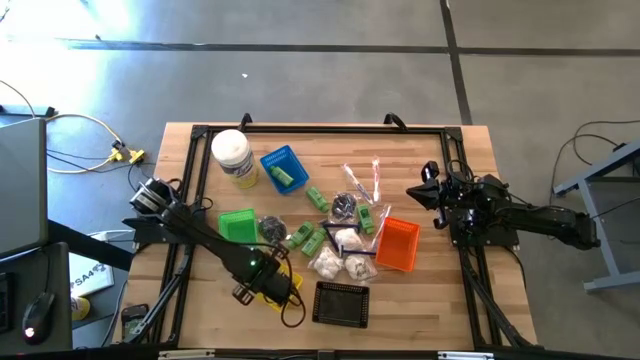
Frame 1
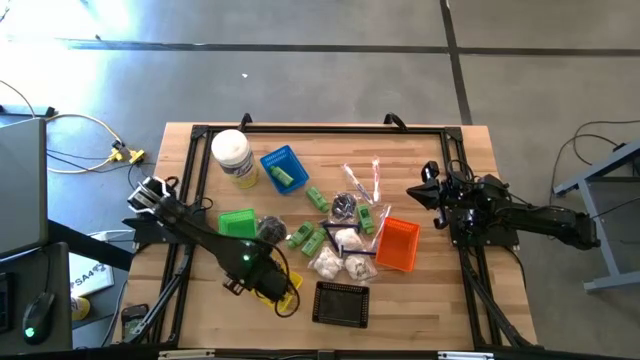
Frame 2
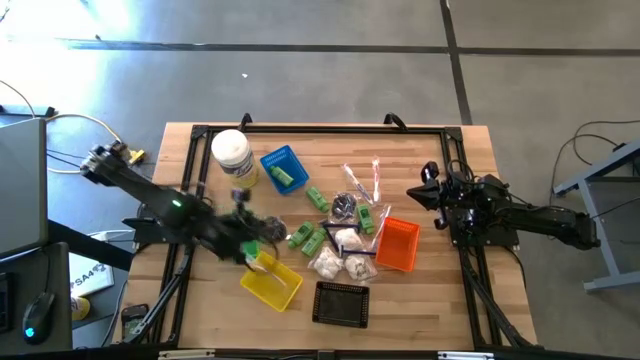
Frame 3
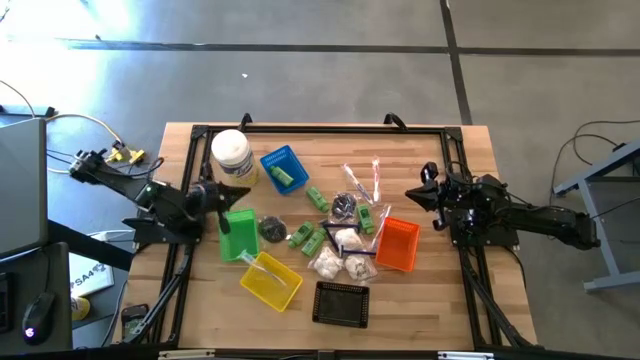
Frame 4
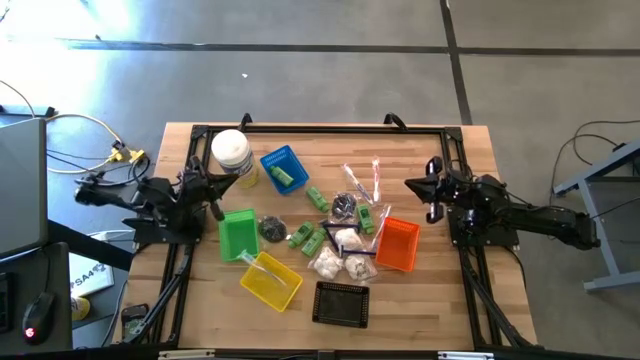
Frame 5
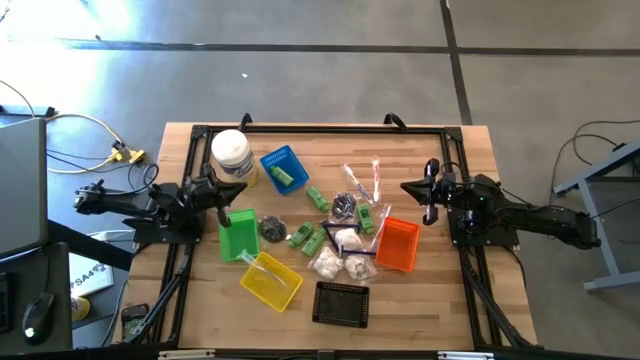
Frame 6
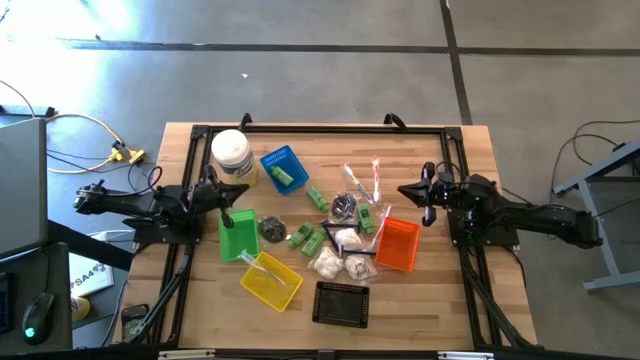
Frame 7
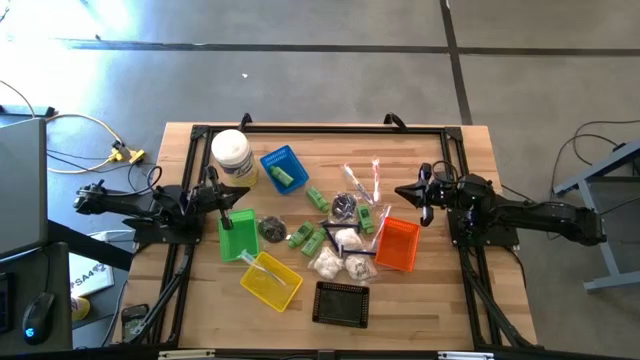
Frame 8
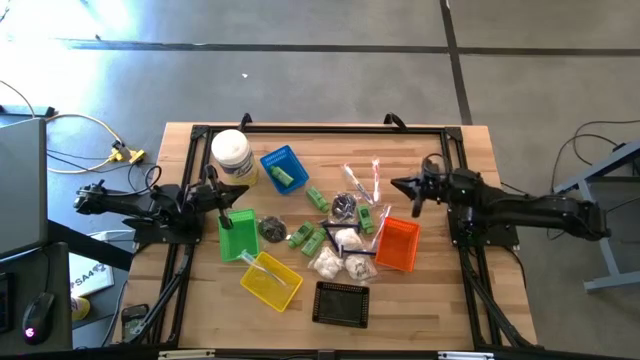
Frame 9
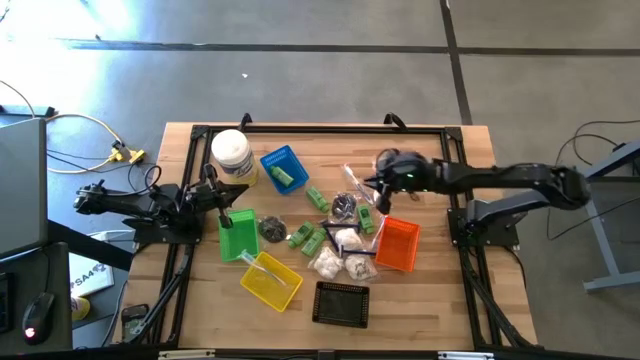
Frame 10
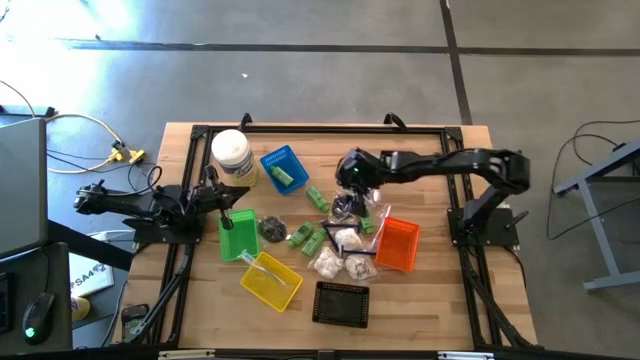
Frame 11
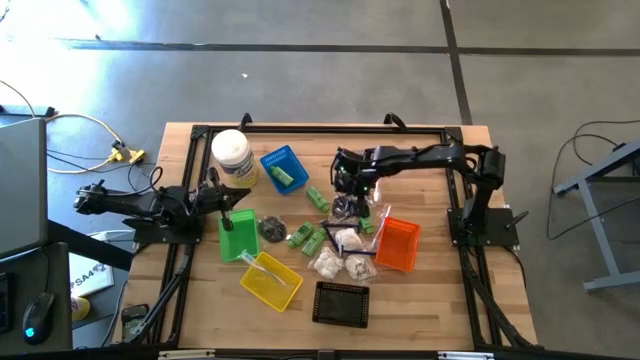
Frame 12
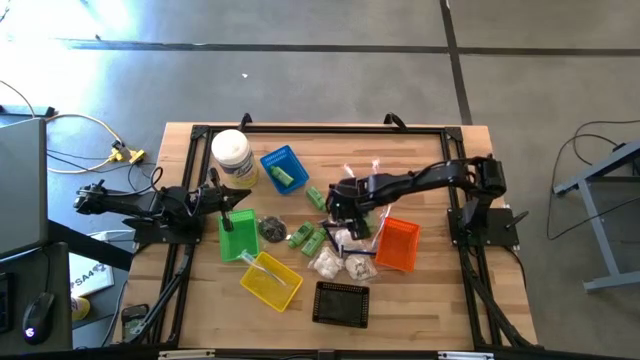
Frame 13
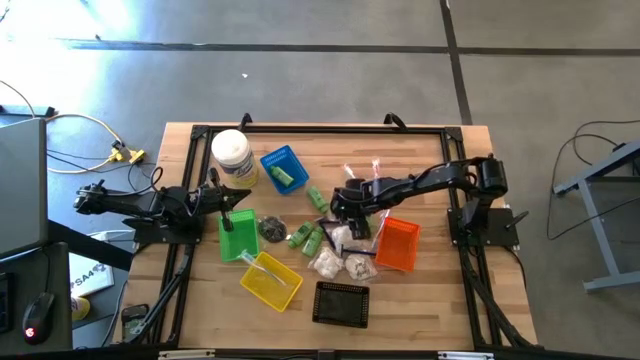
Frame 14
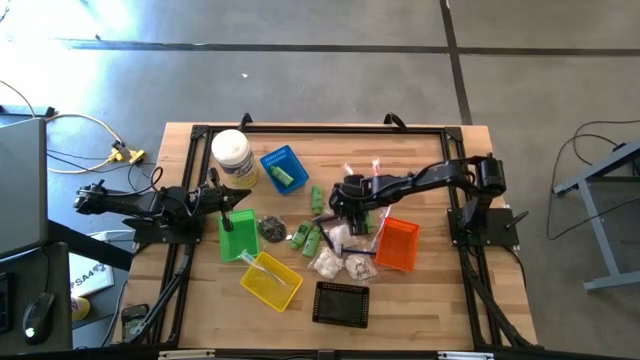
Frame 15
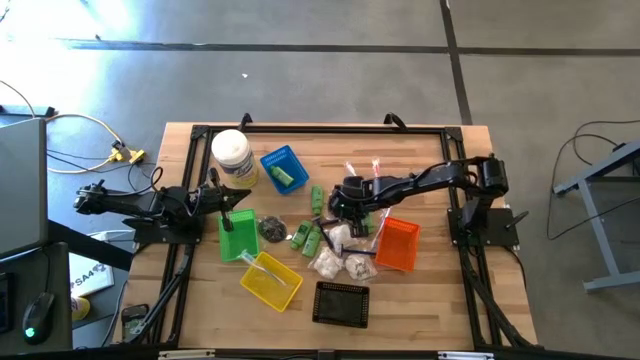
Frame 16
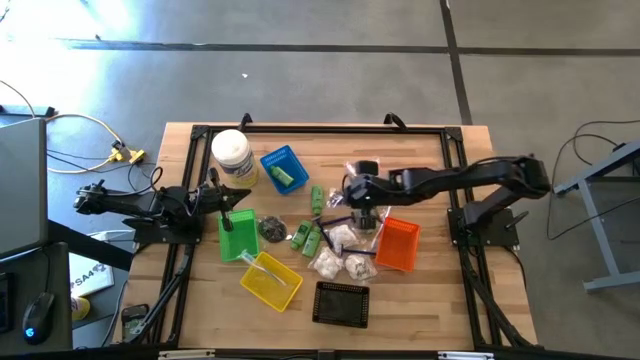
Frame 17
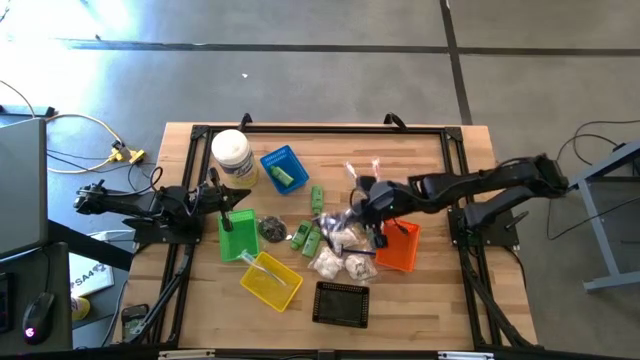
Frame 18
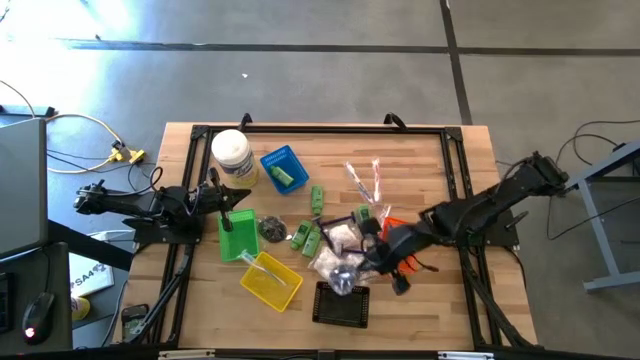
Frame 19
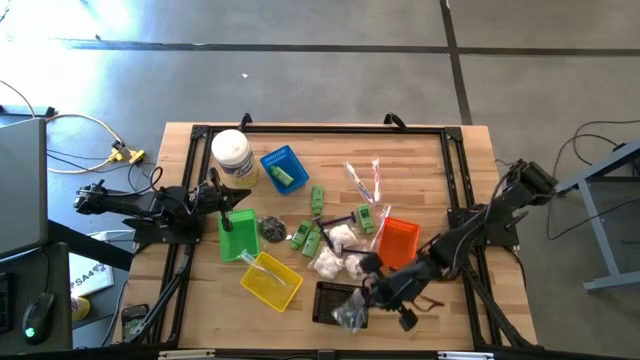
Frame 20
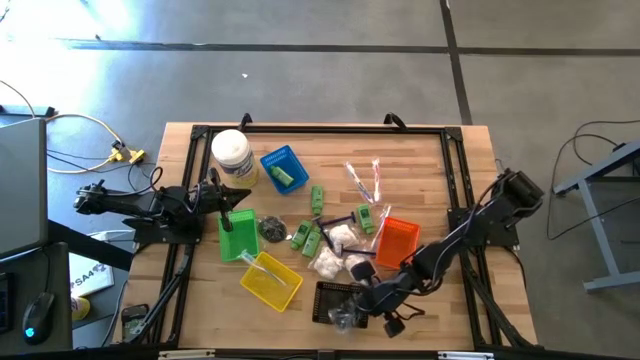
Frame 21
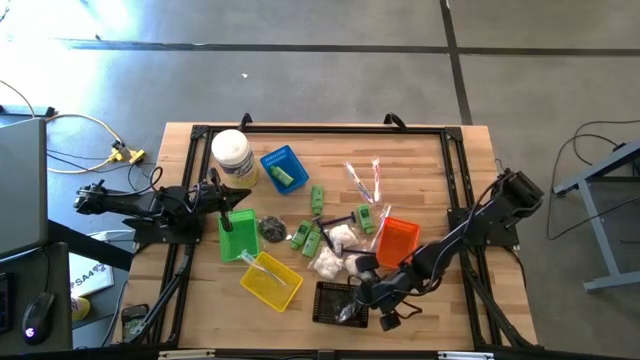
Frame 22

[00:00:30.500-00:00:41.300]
Task: Pick & Place Travel size toiletries
Put the black hairbrush into the black bin

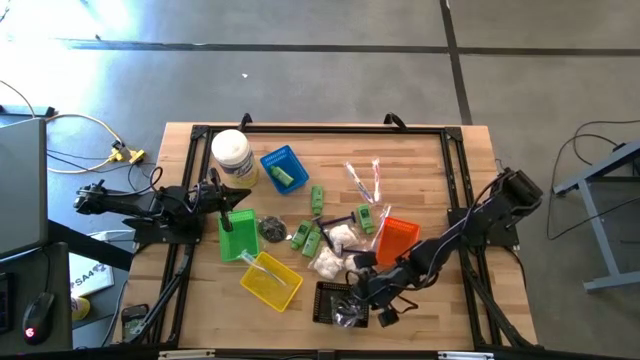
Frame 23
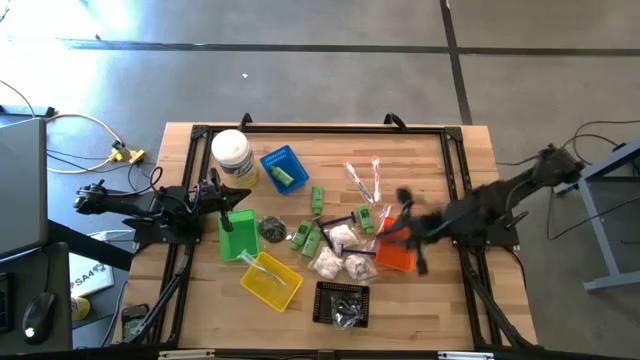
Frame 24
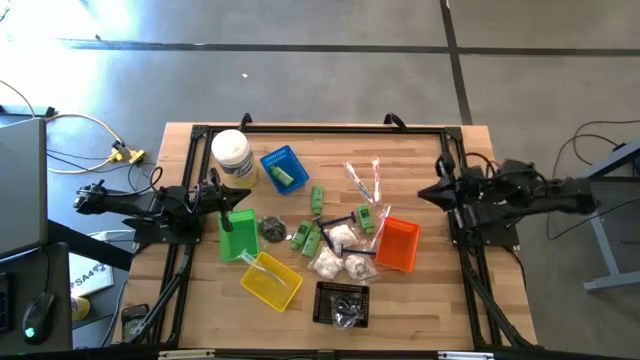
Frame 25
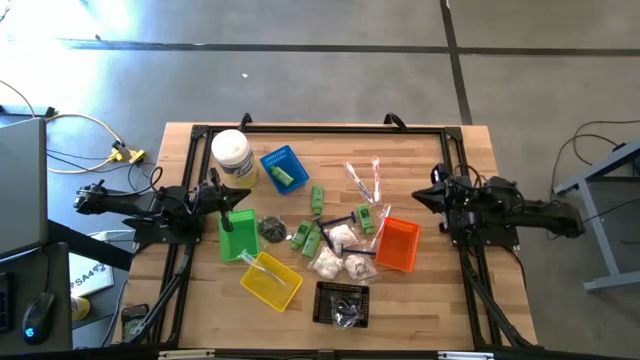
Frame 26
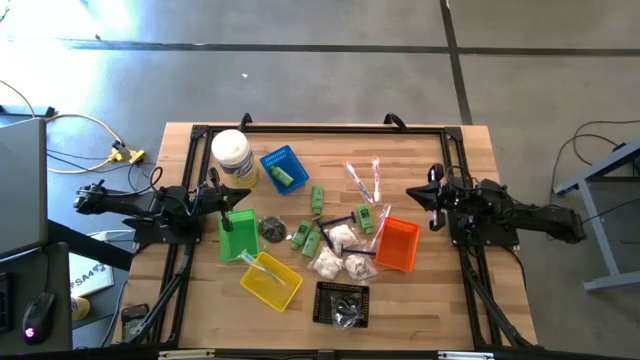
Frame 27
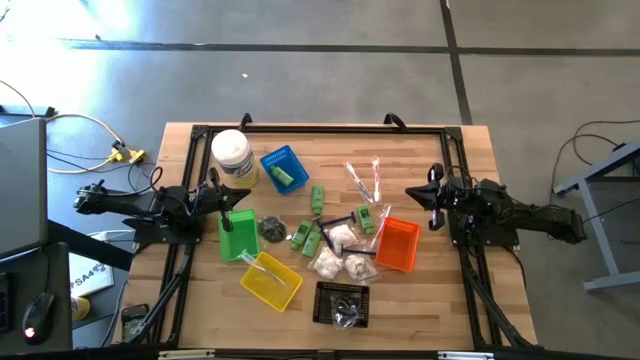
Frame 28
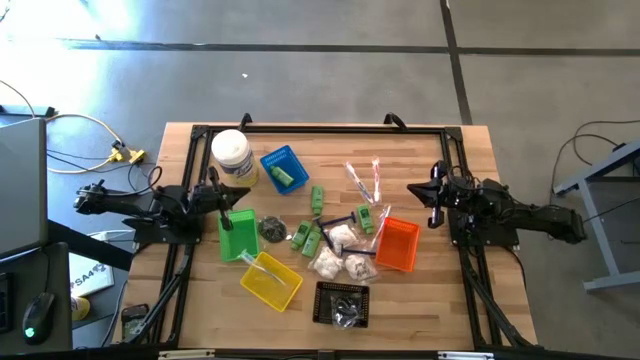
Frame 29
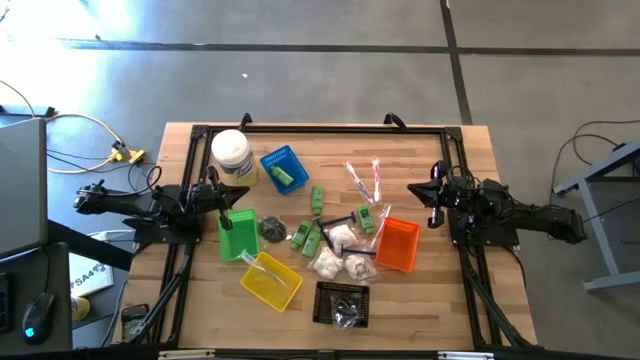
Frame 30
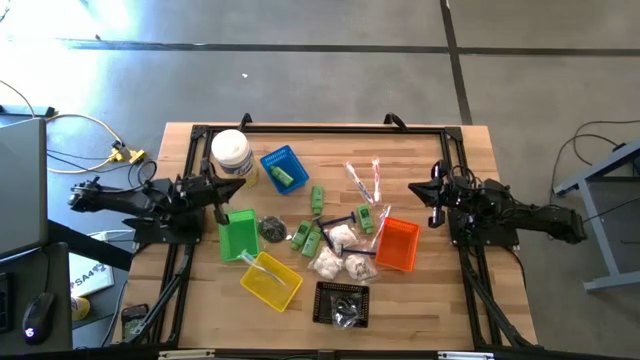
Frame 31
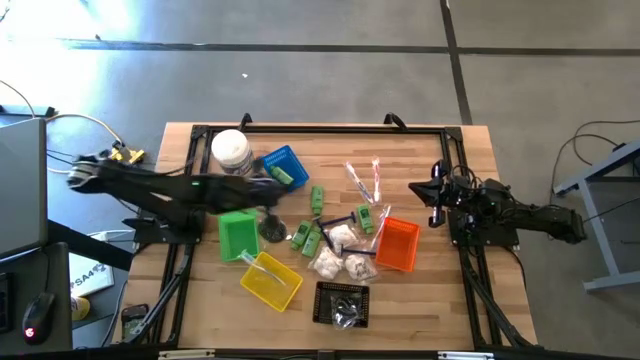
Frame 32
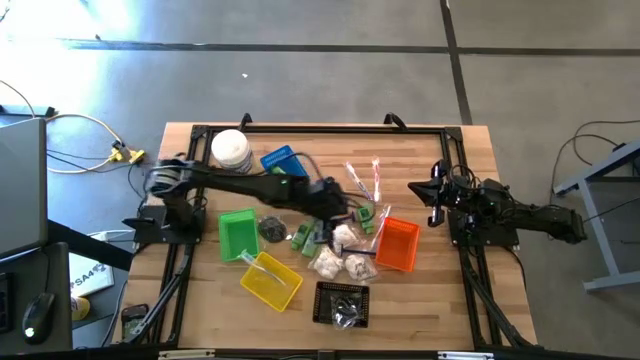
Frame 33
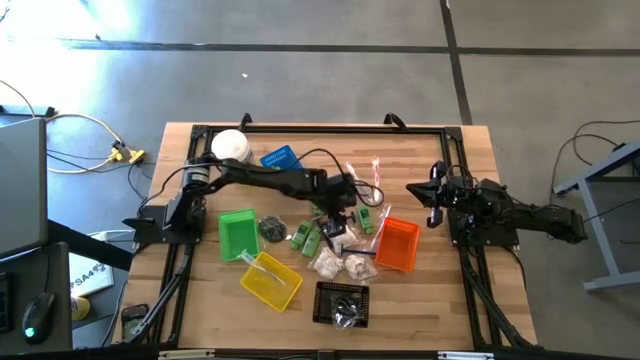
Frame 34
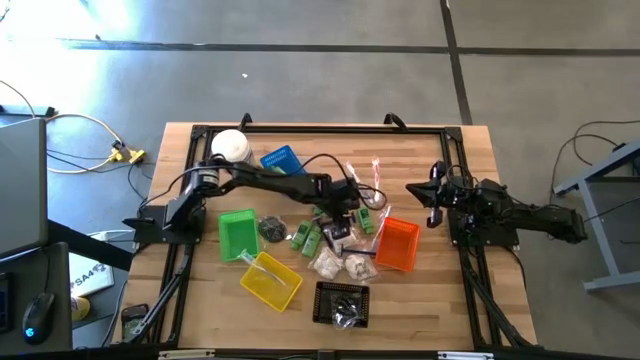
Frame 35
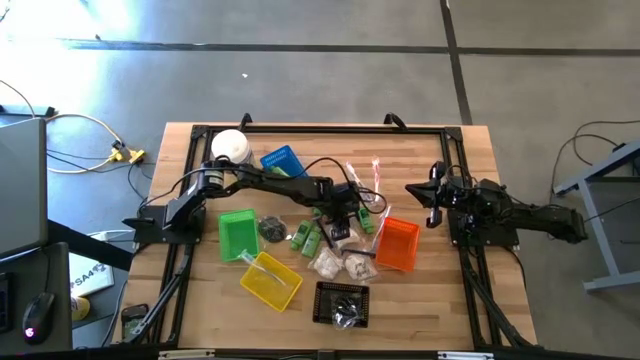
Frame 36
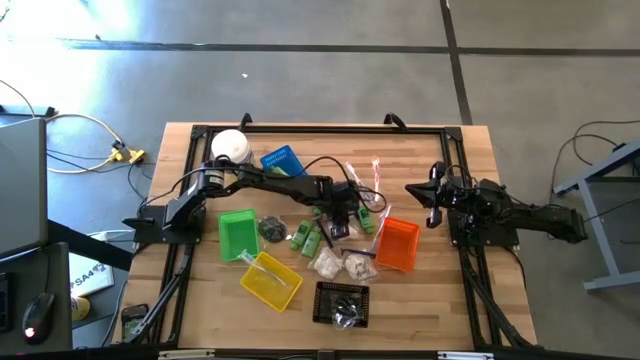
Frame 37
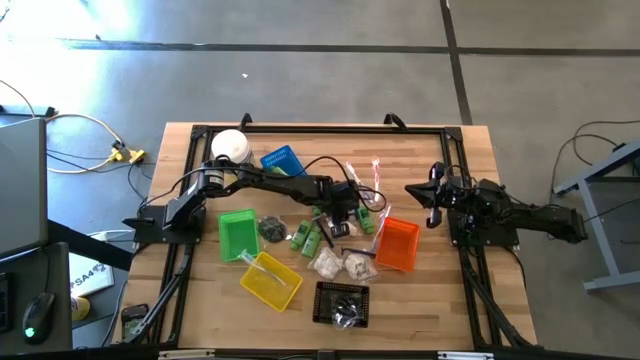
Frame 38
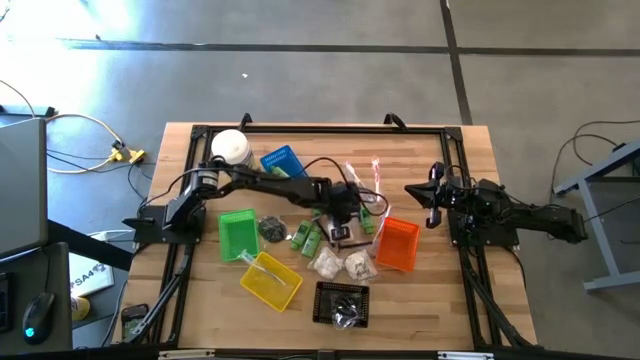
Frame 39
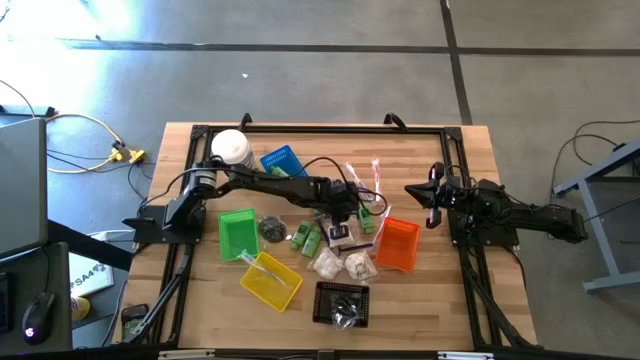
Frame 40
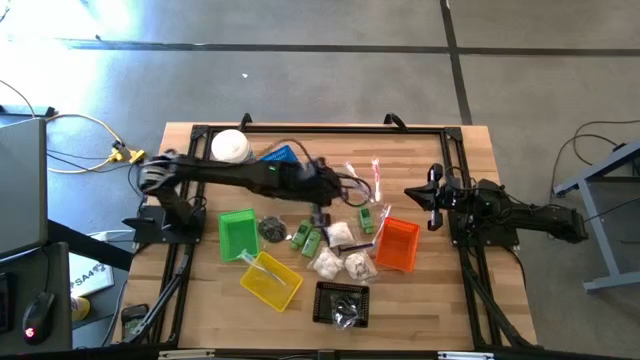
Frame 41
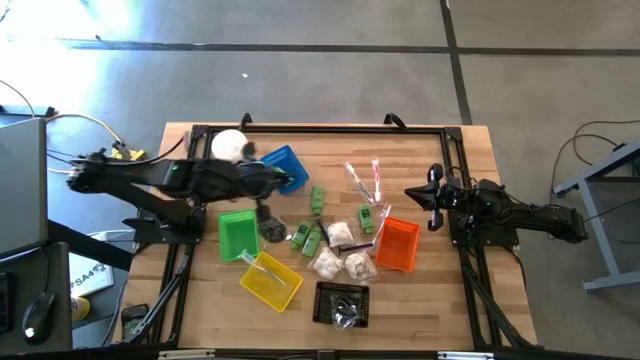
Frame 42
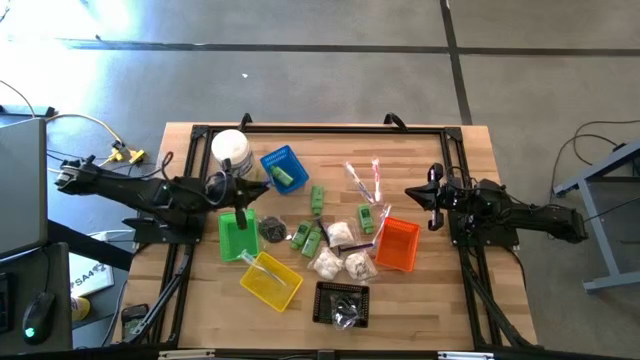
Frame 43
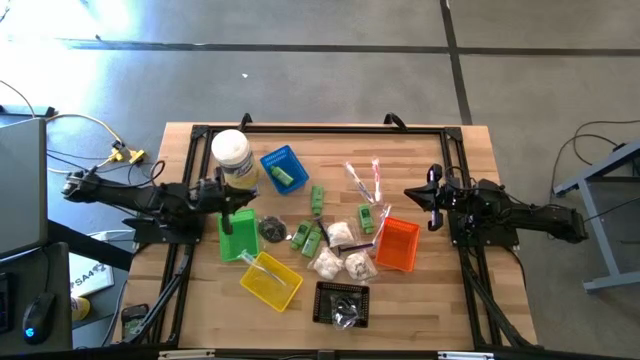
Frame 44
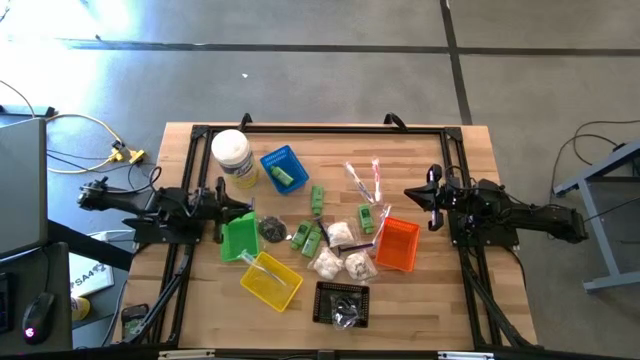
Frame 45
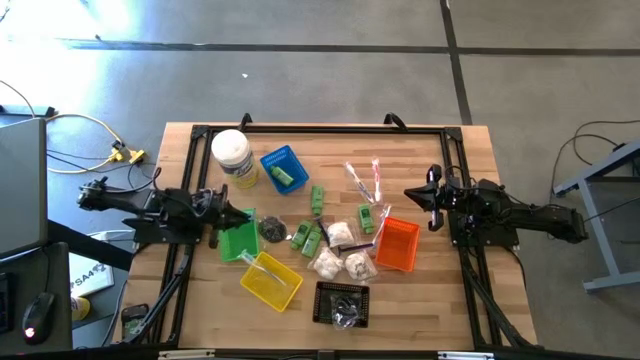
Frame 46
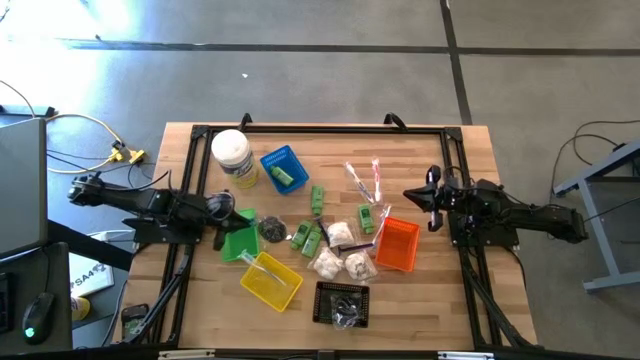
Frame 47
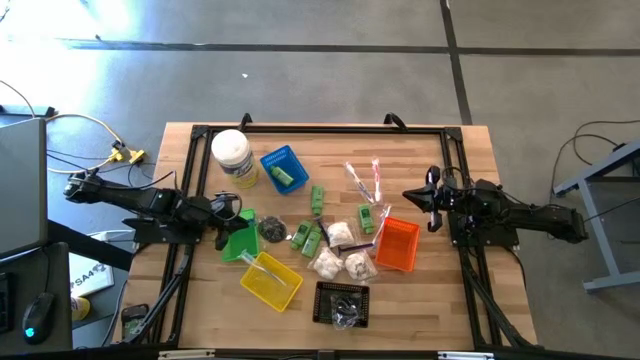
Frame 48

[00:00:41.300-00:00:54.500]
Put the blue razor into the green bin
